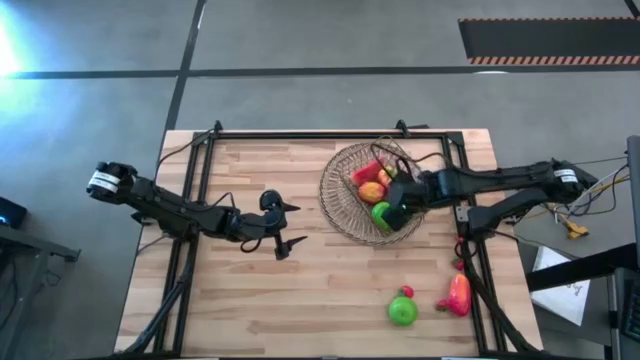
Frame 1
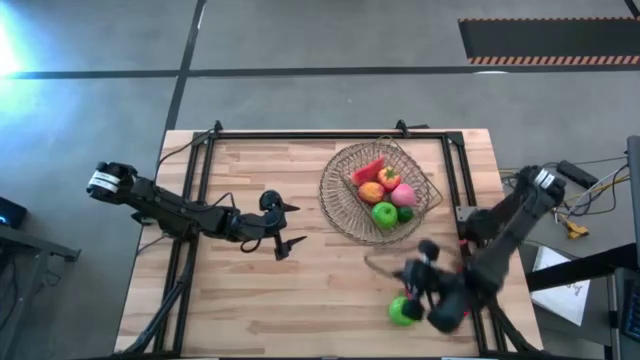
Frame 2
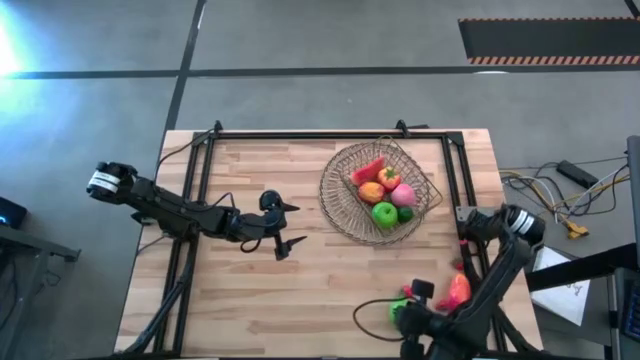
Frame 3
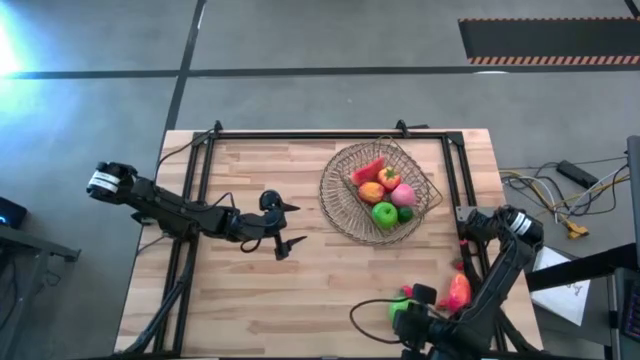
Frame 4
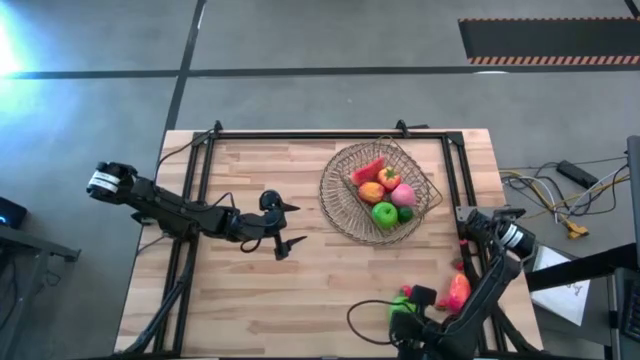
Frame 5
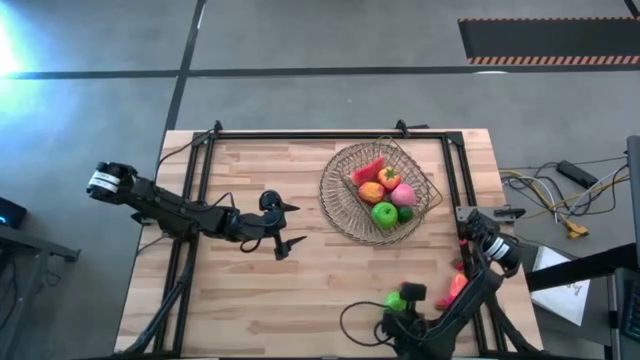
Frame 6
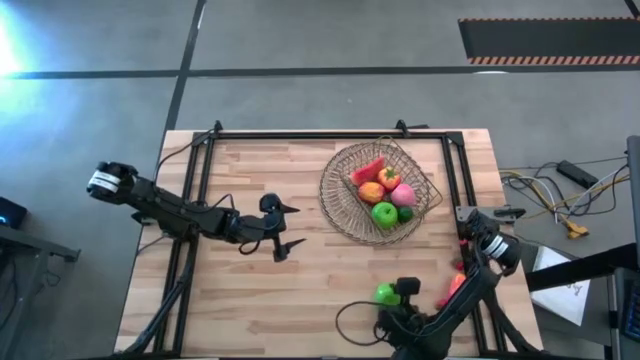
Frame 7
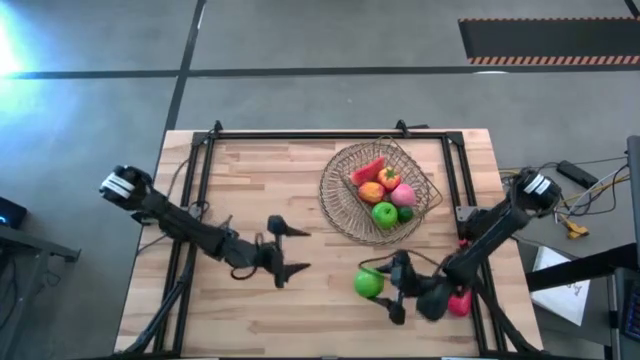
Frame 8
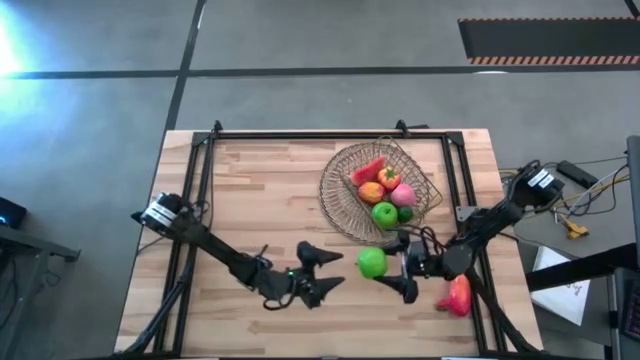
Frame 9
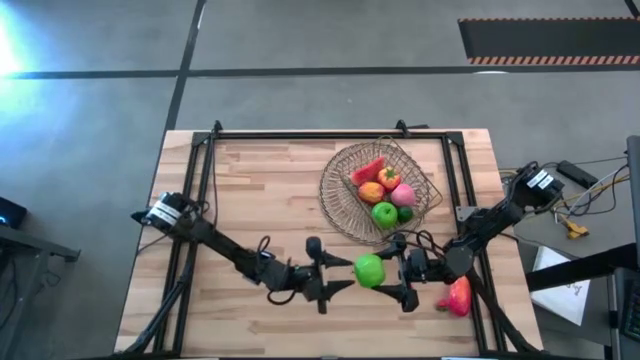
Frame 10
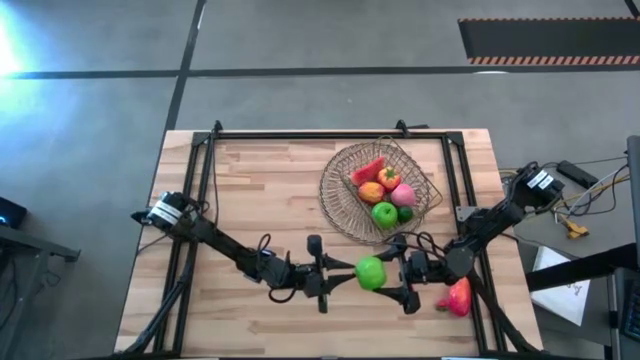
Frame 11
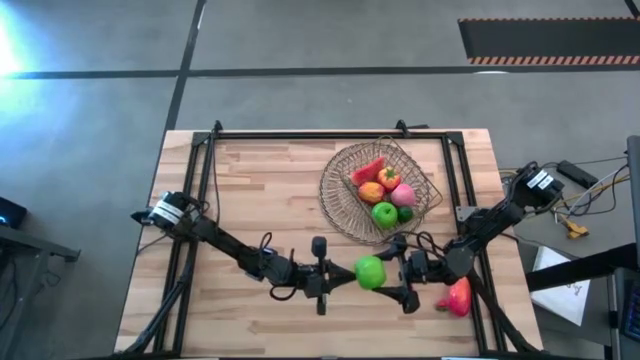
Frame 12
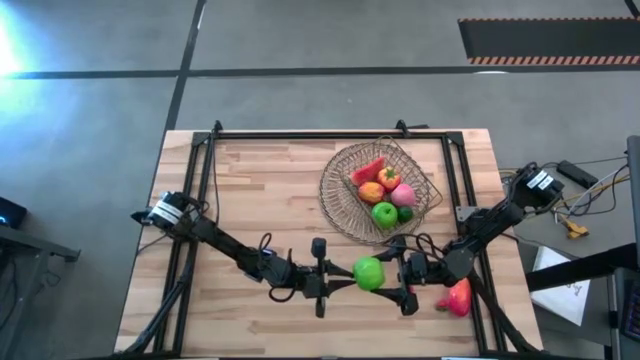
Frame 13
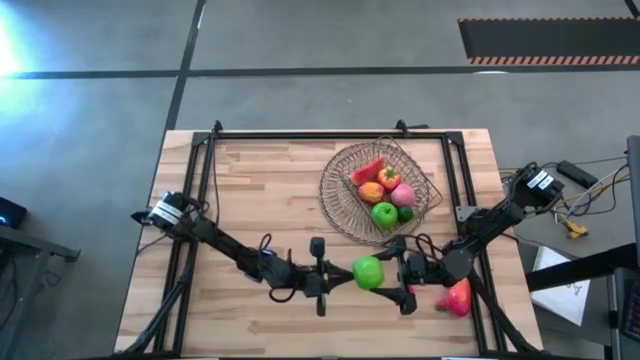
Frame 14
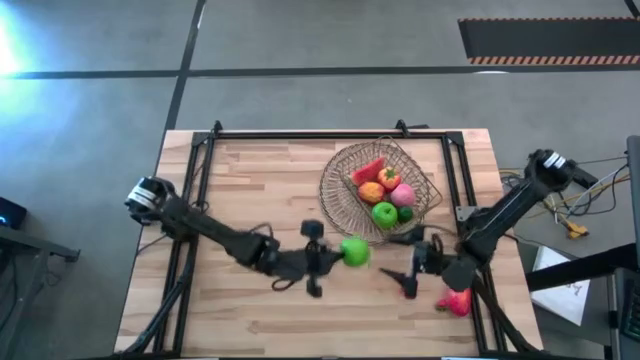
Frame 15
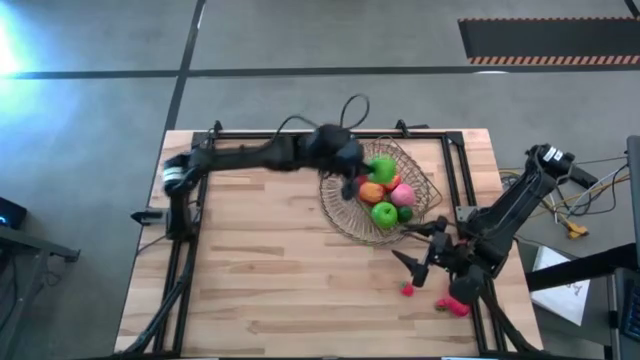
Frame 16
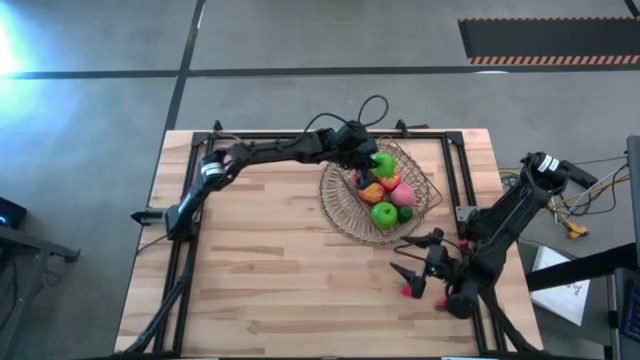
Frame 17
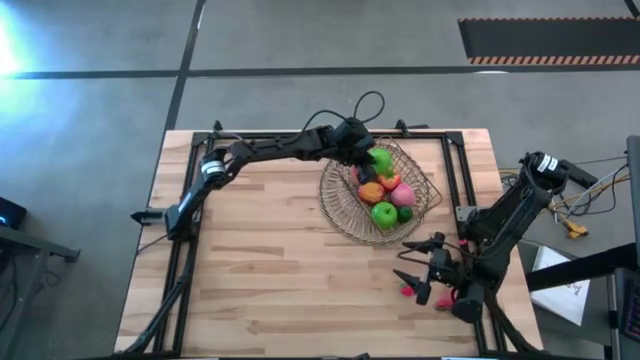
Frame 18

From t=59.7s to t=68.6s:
Task: Build produce basket
Put the green apple into the gold mesh basket

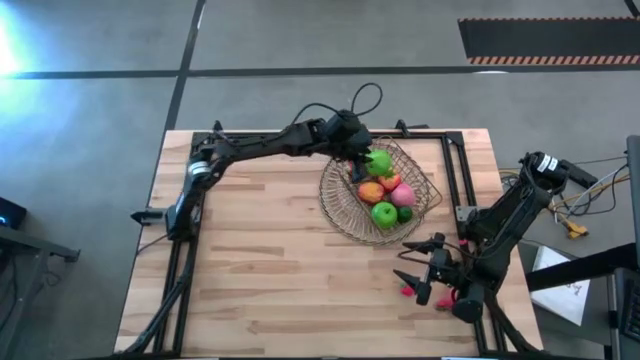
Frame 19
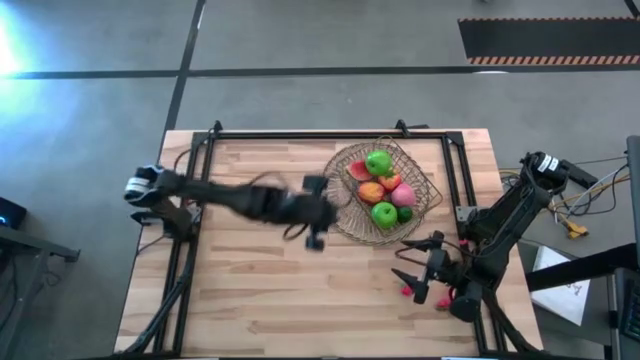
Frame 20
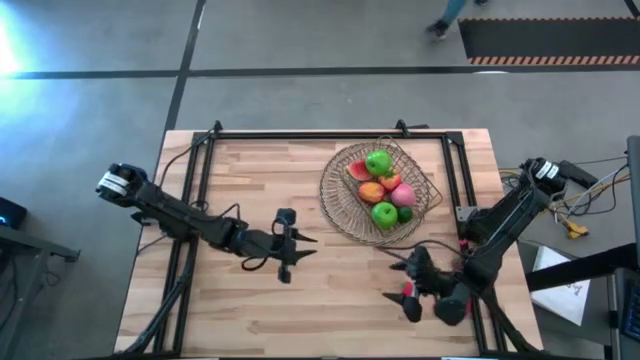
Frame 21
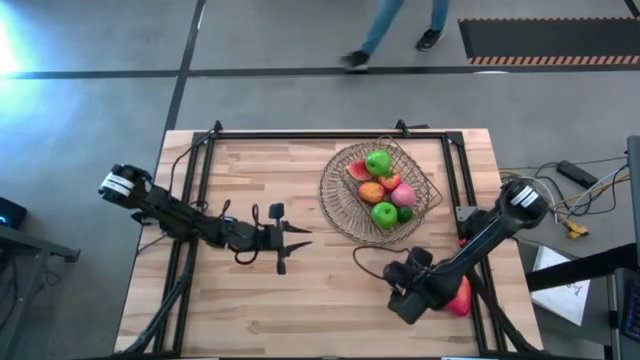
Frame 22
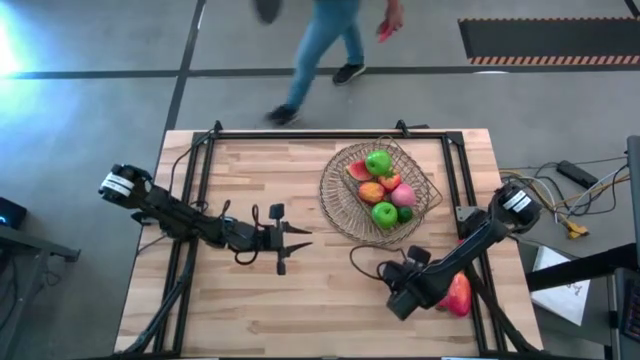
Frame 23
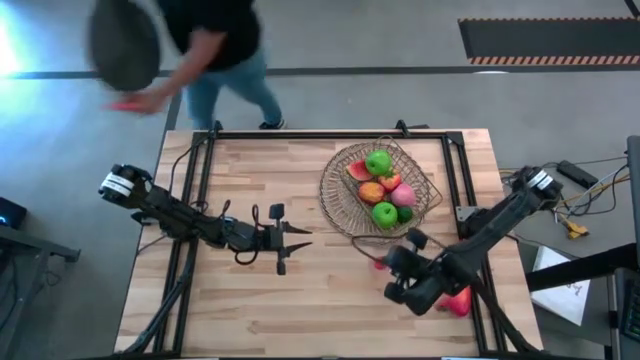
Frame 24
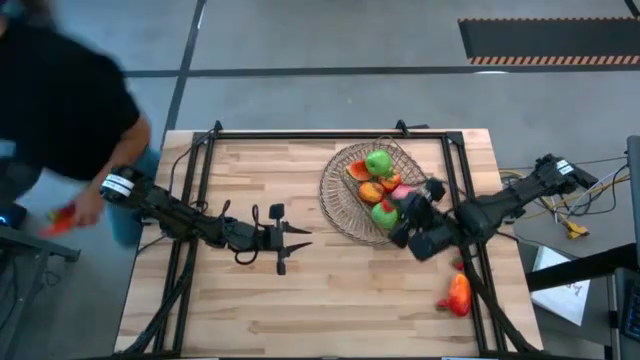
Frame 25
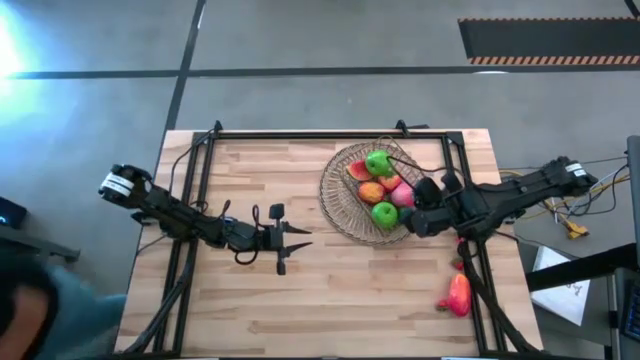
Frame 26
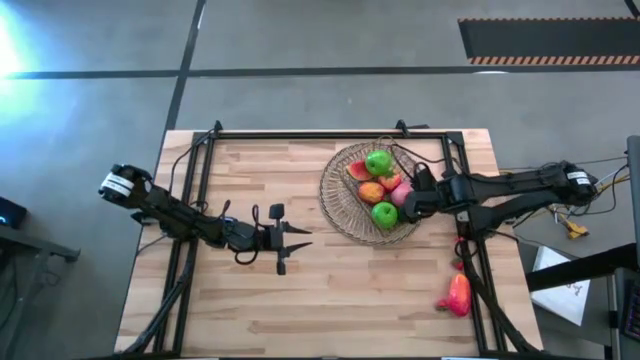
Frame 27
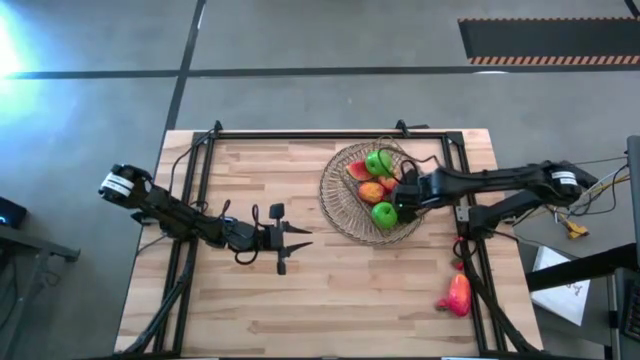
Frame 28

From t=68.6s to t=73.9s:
Put the bottom left red strawberry into the gold mesh basket

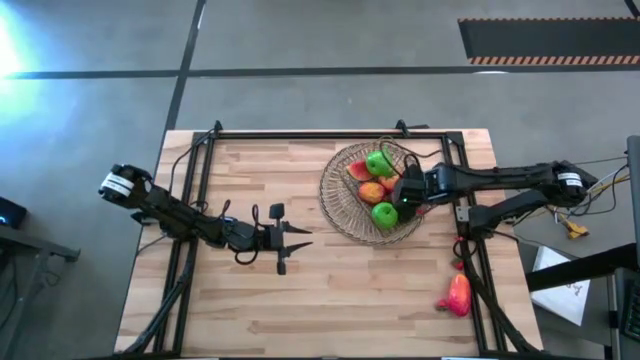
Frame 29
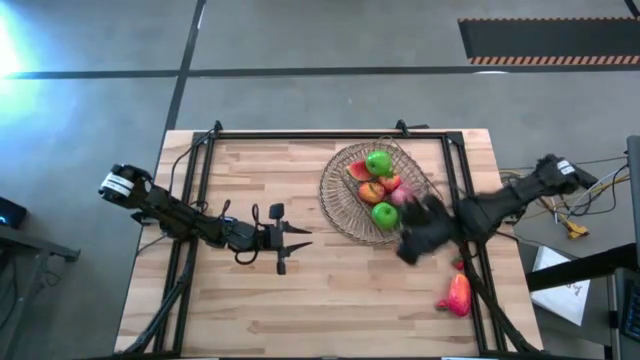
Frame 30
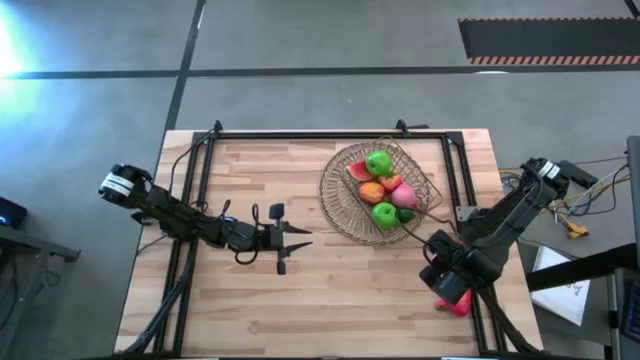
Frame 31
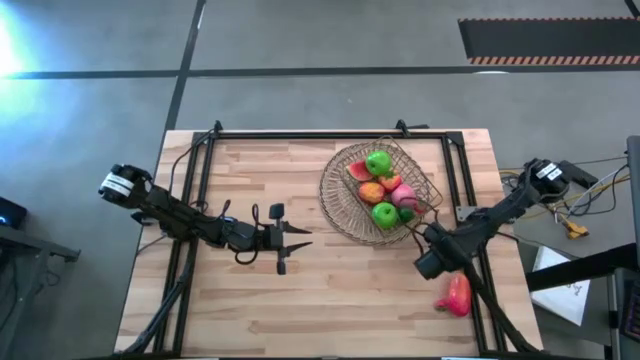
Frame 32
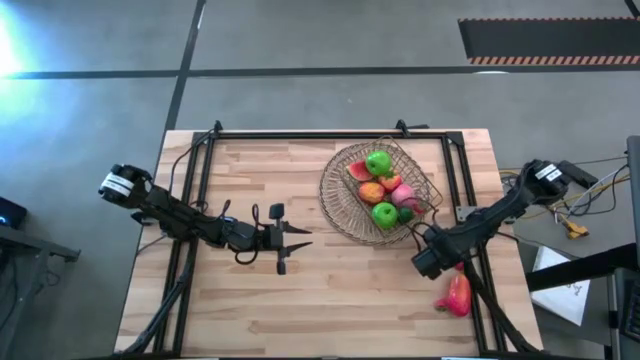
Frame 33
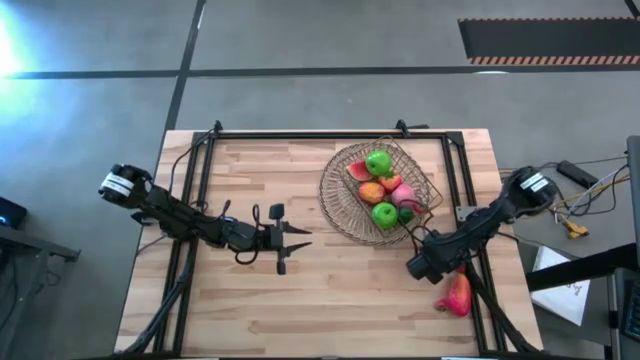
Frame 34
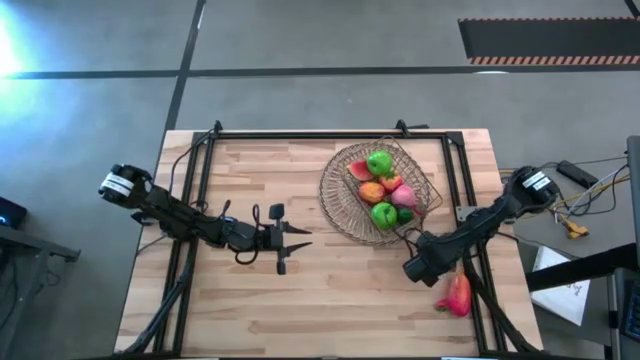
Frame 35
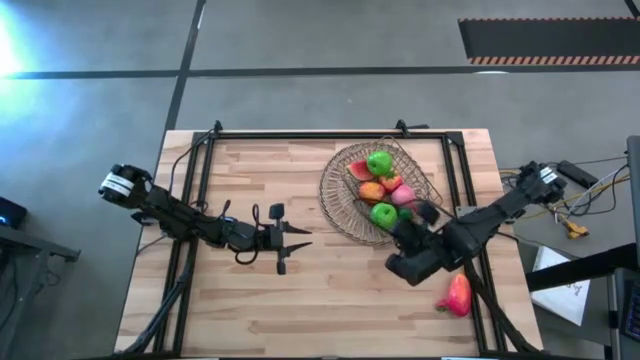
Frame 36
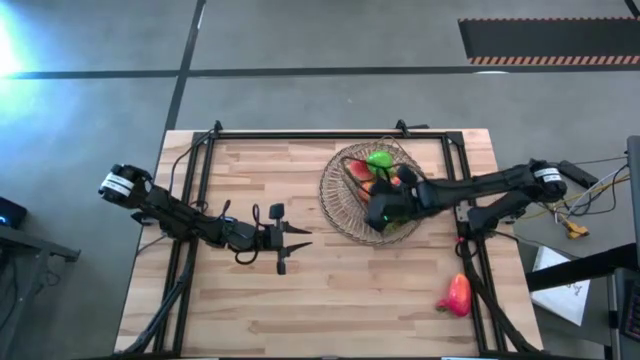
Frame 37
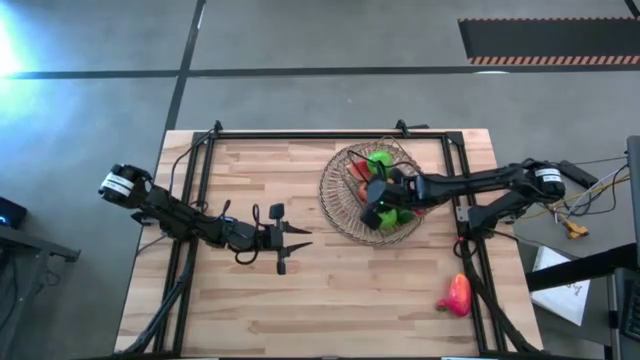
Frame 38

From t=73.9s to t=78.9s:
Put the top red strawberry into the gold mesh basket

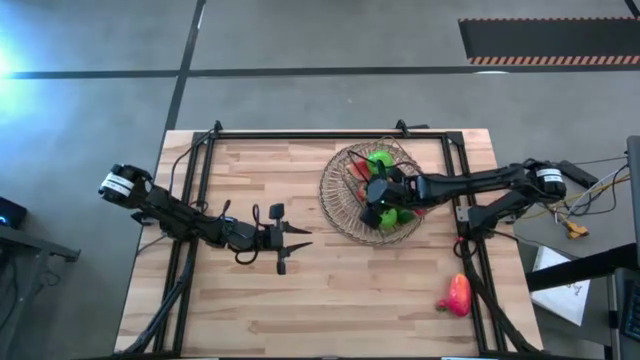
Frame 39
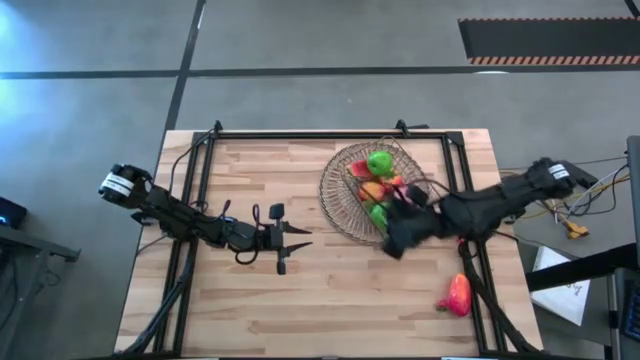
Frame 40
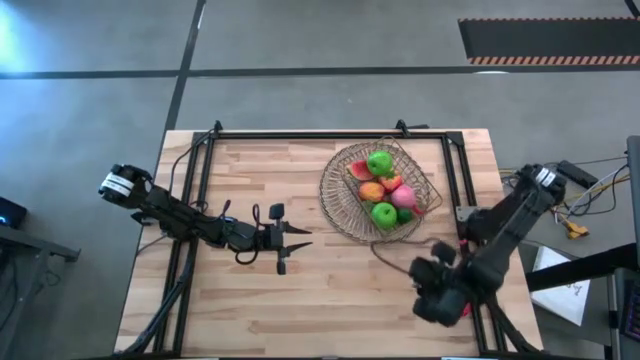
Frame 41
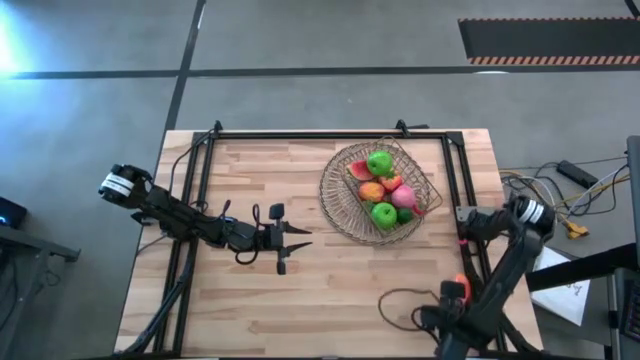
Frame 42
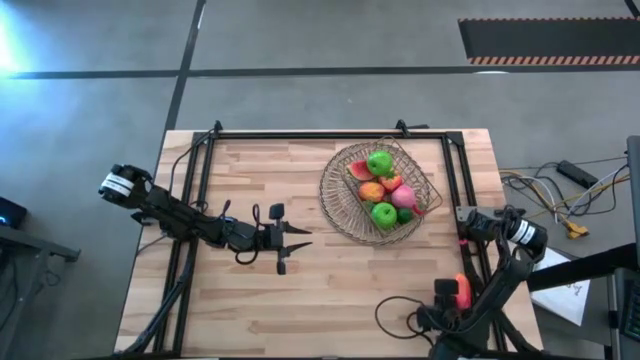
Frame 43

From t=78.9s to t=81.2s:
Put the red strawberry into the gold mesh basket
